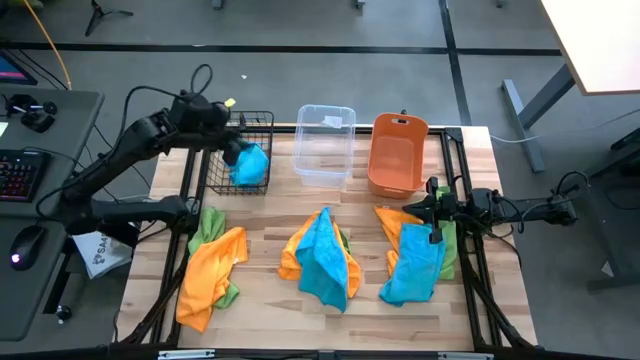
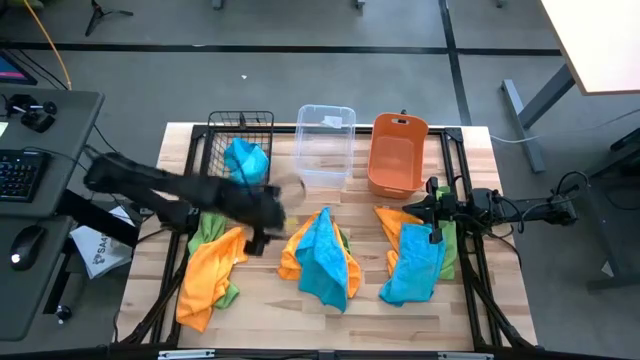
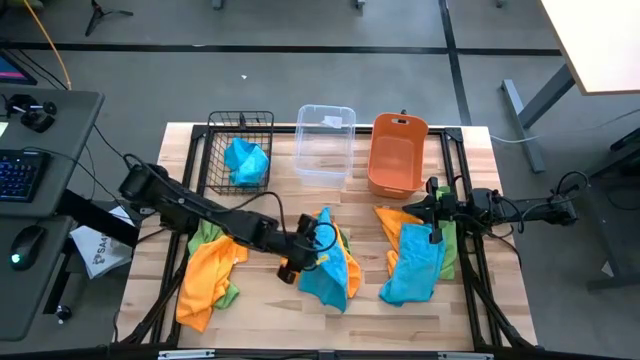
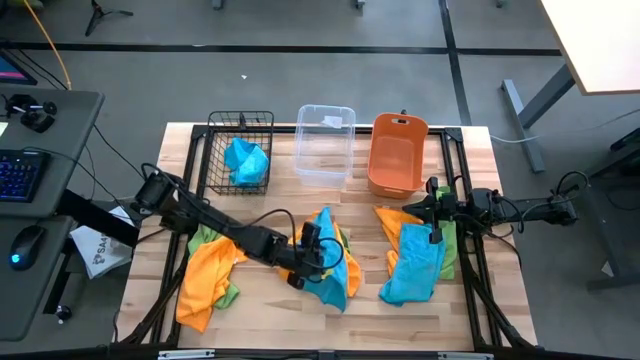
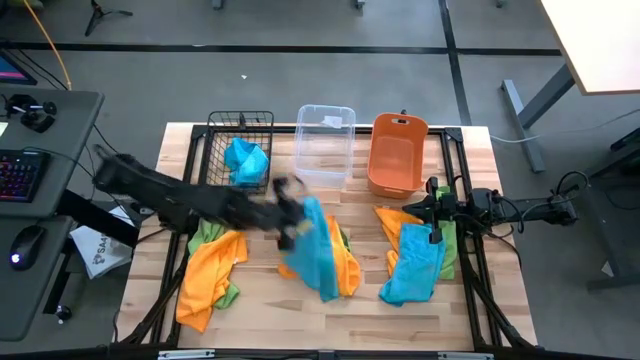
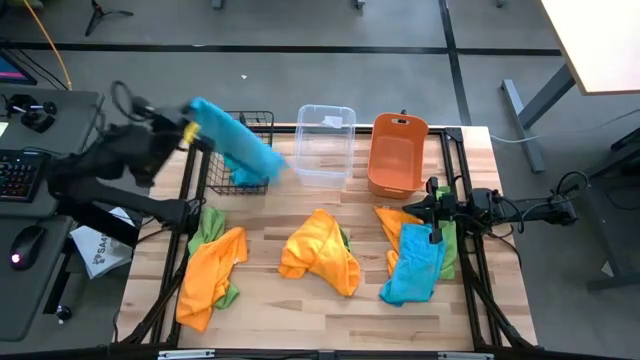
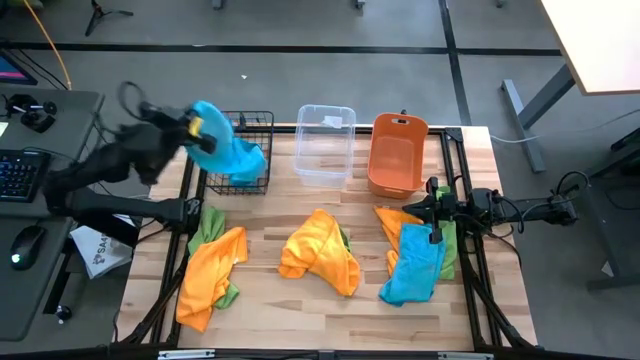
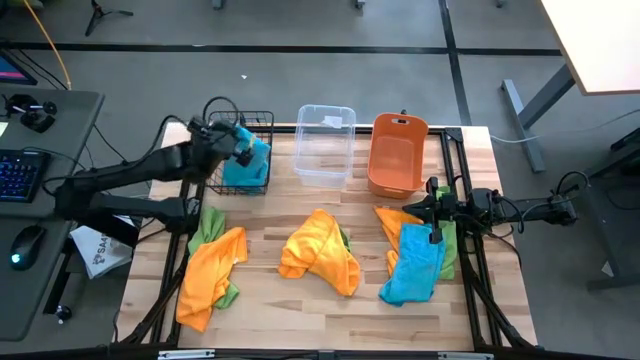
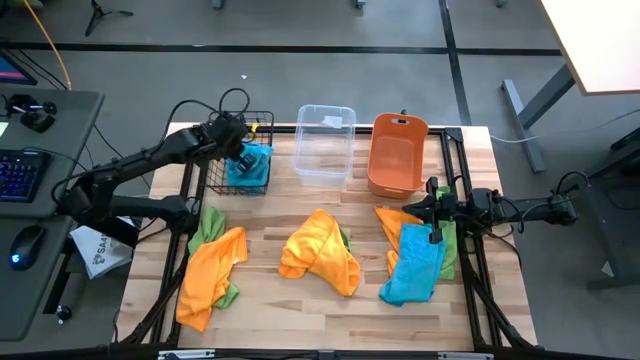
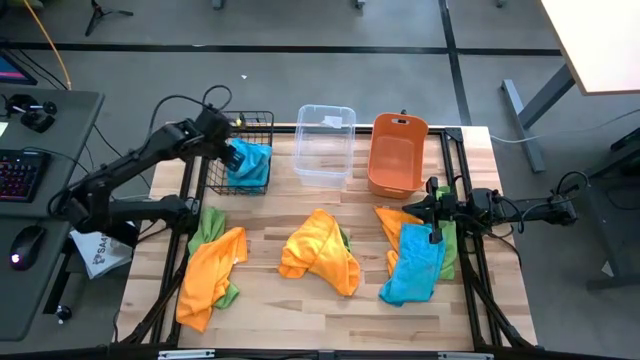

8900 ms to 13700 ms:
Task: Sort microfiber towel by color & place in baskets
Put the left blue towel into the wire basket

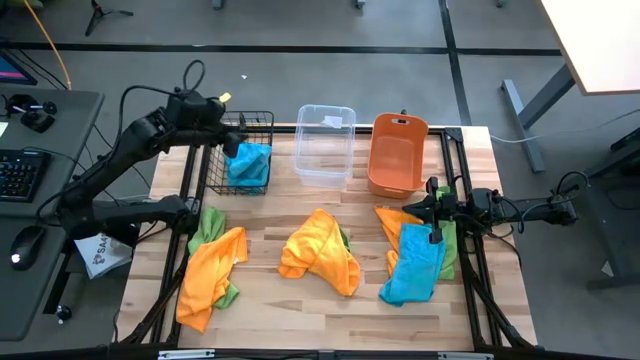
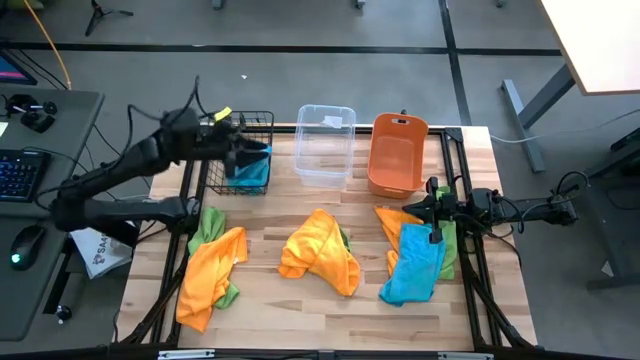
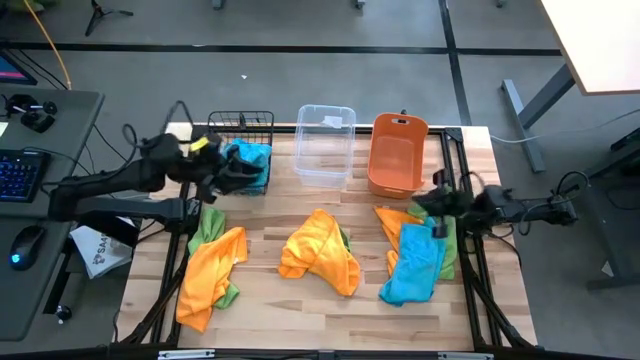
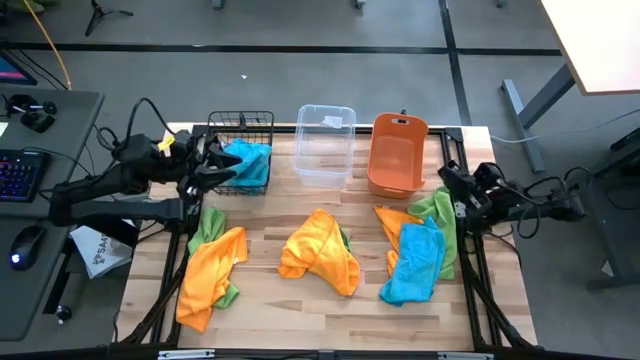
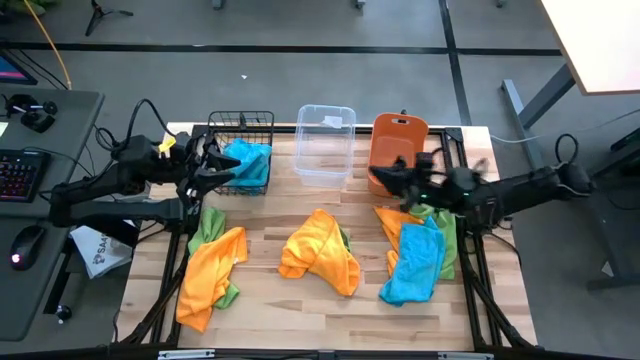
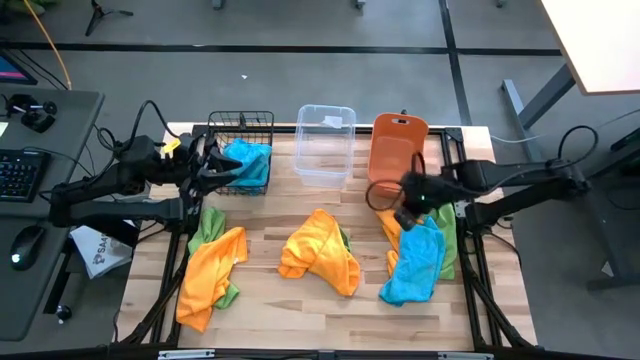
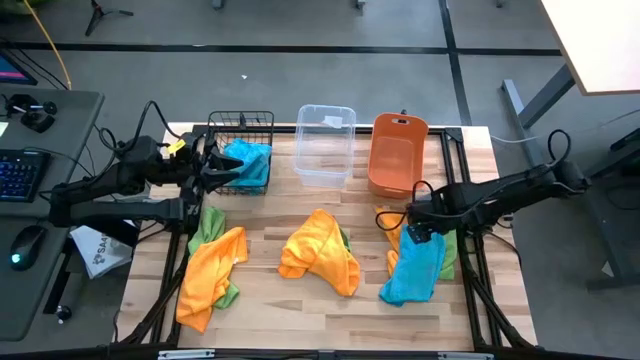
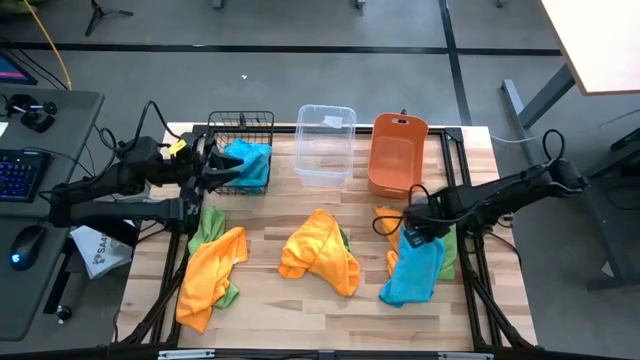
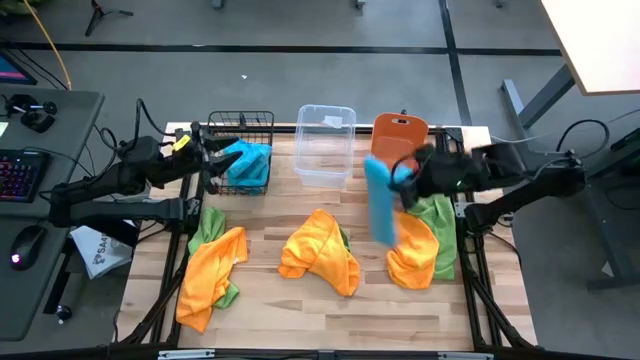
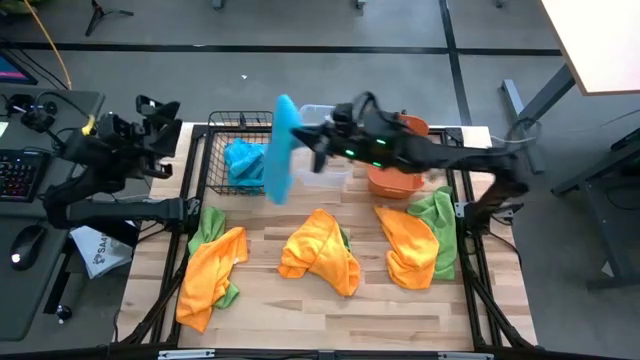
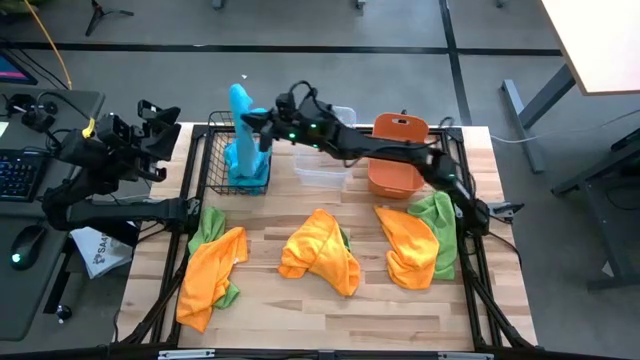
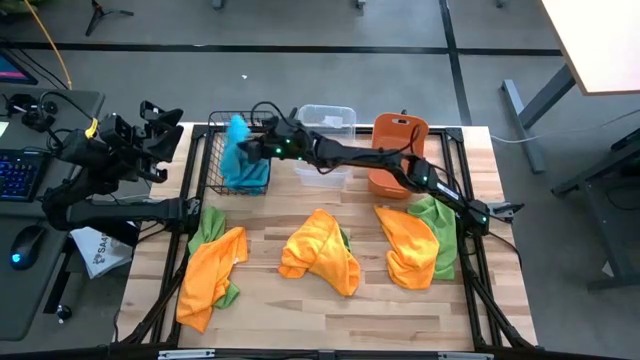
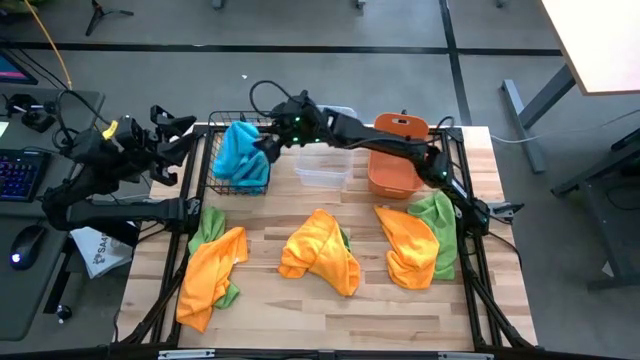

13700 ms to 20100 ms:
Put the blue towel into the wire basket

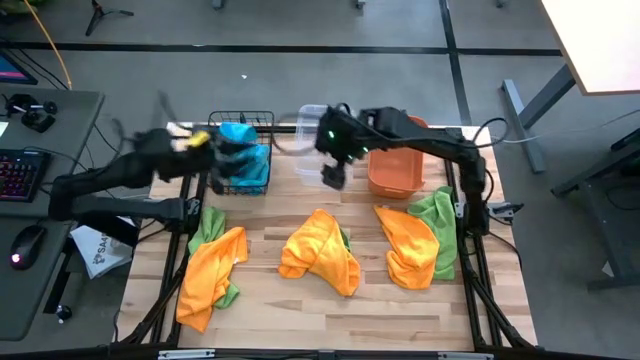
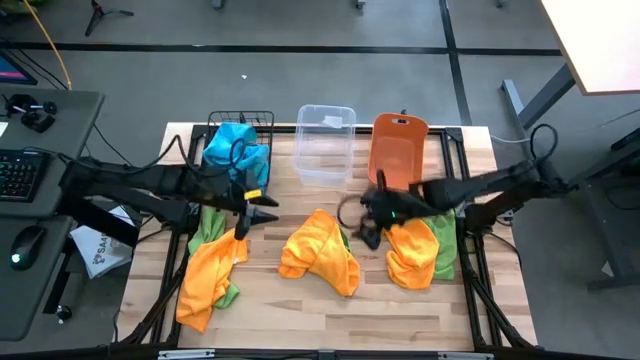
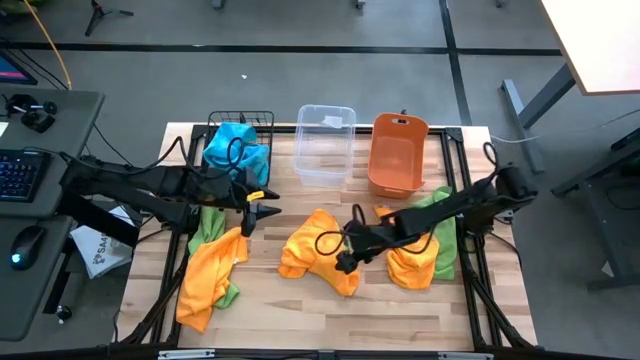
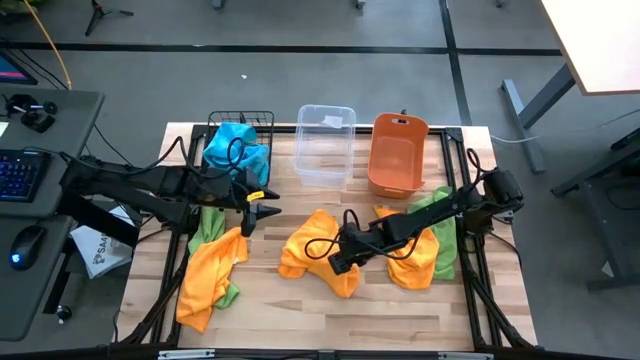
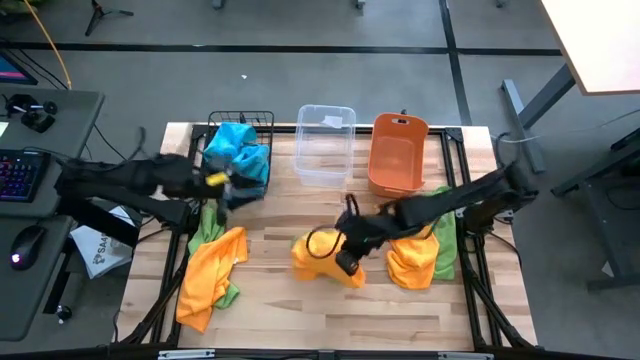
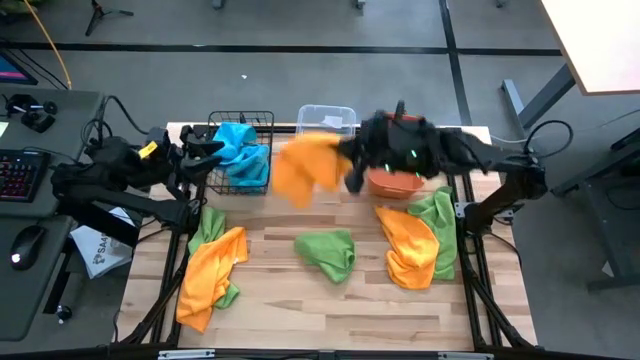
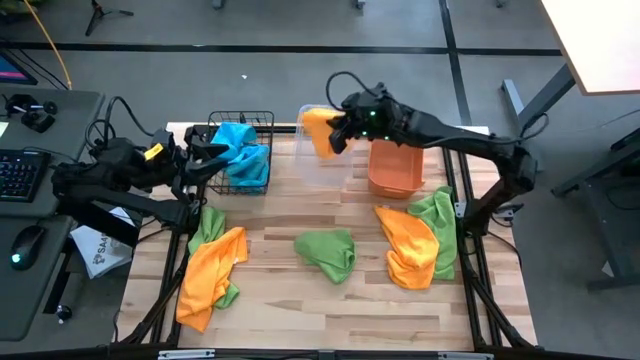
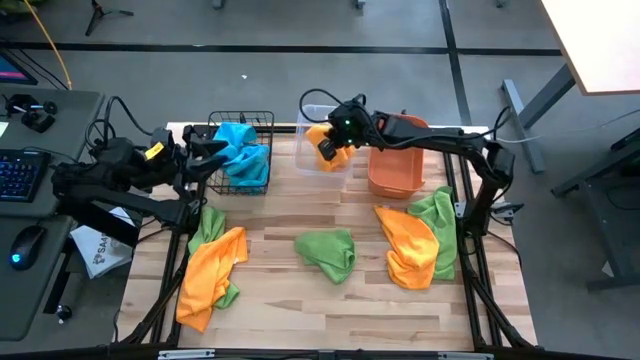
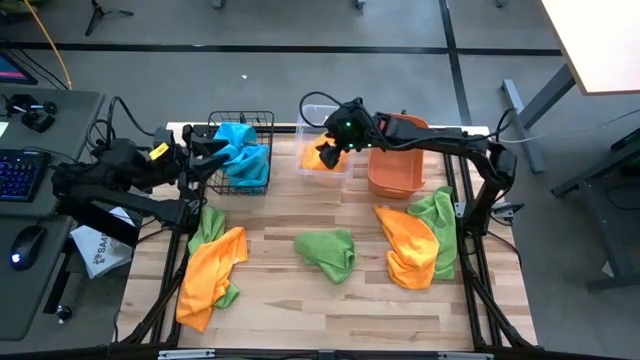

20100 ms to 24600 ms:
Put the middle orange towel into the transparent bin

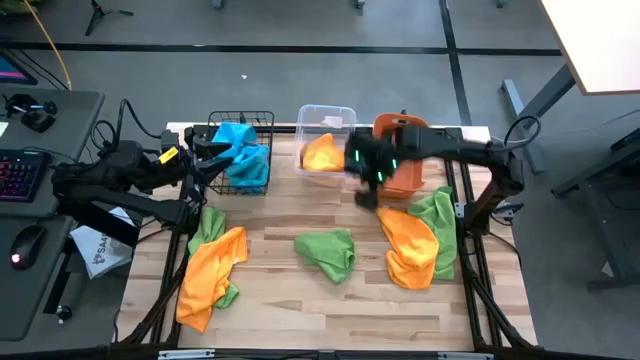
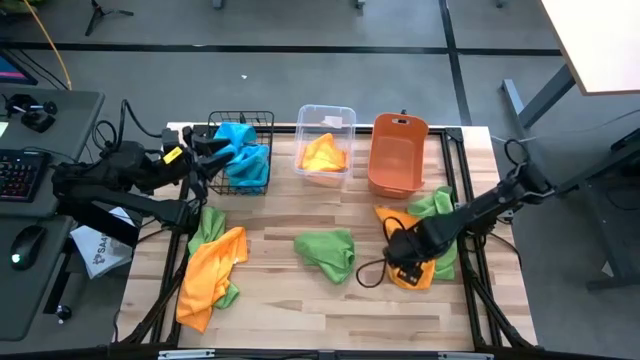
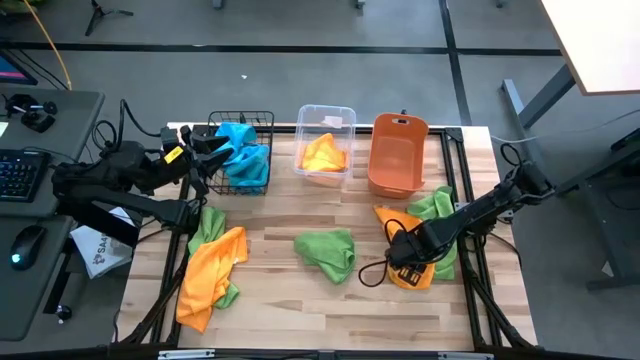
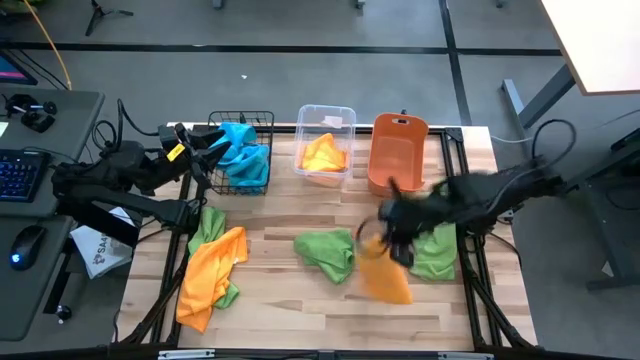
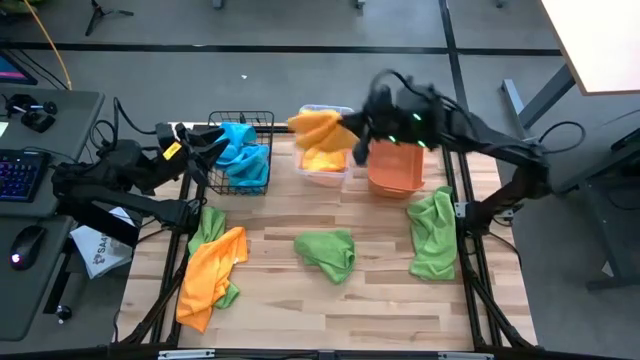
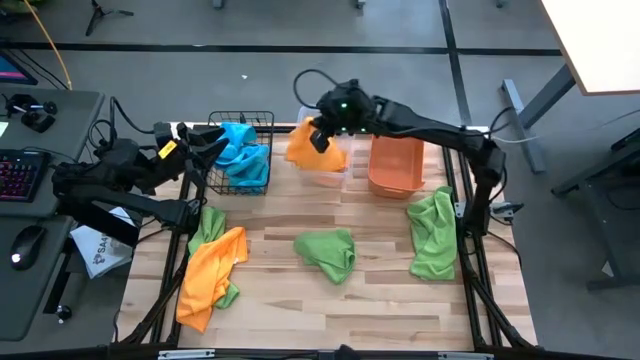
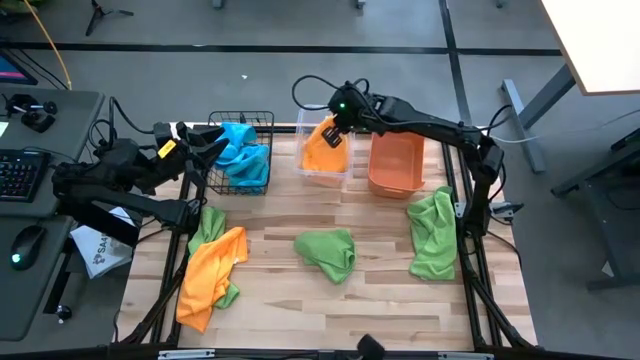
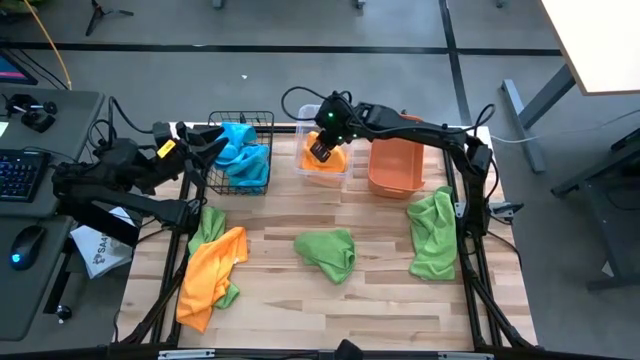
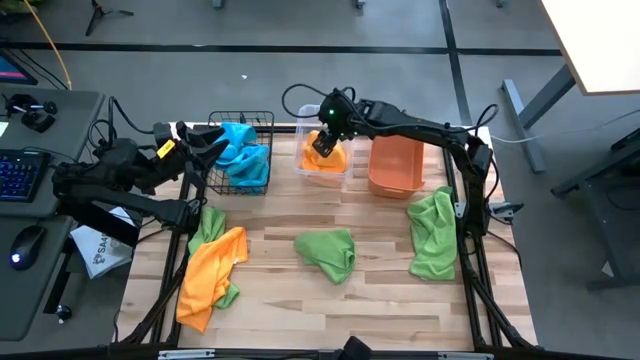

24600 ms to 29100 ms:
Put the right orange towel into the transparent bin
